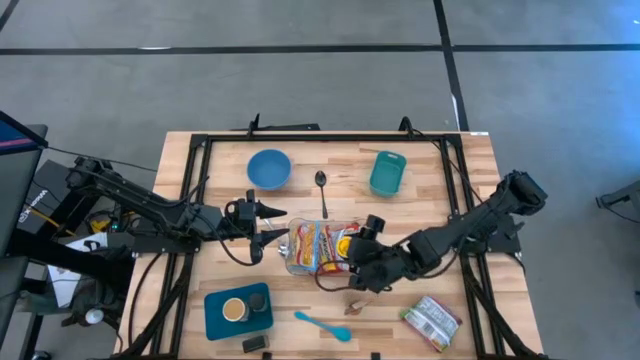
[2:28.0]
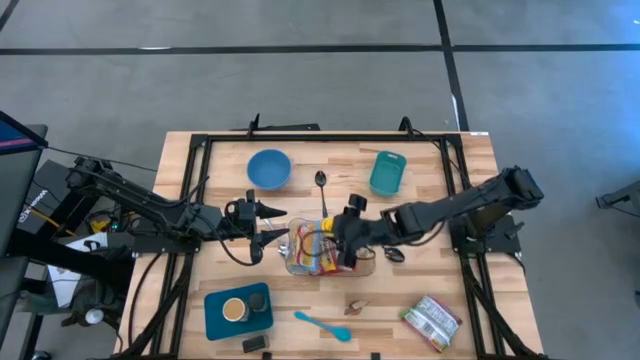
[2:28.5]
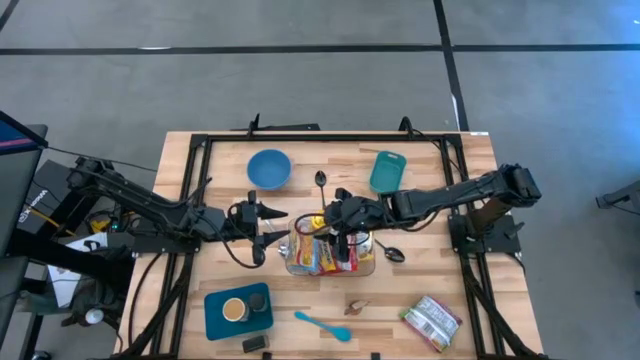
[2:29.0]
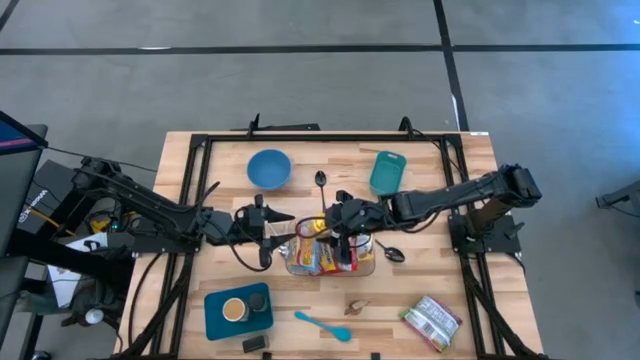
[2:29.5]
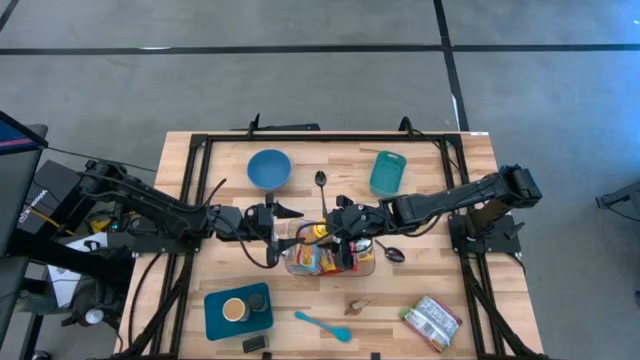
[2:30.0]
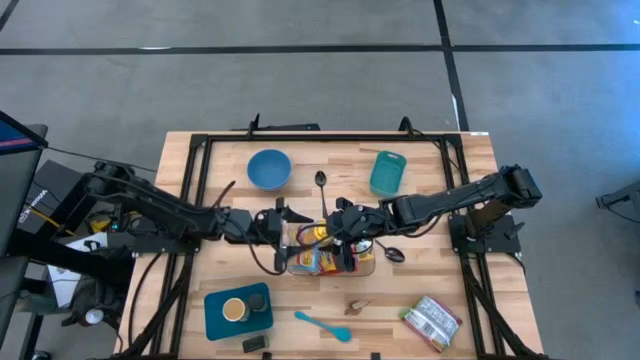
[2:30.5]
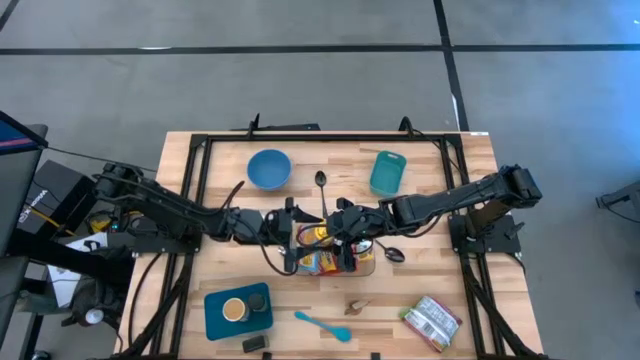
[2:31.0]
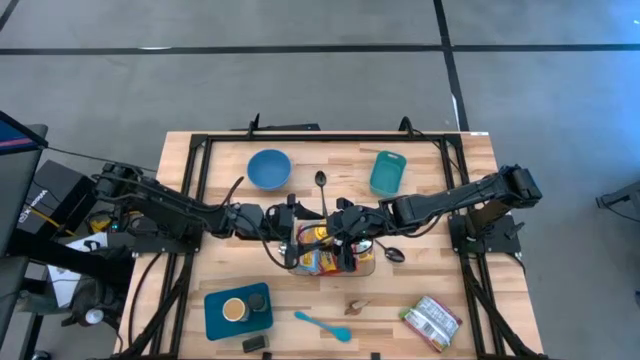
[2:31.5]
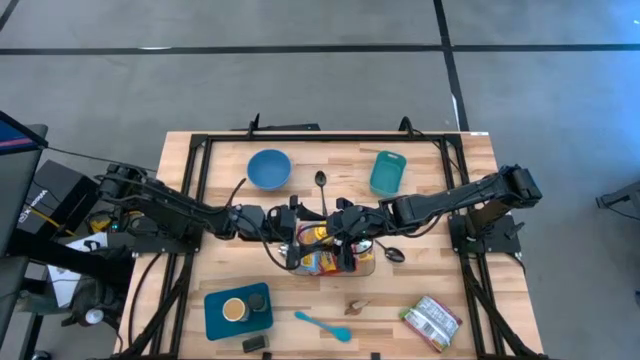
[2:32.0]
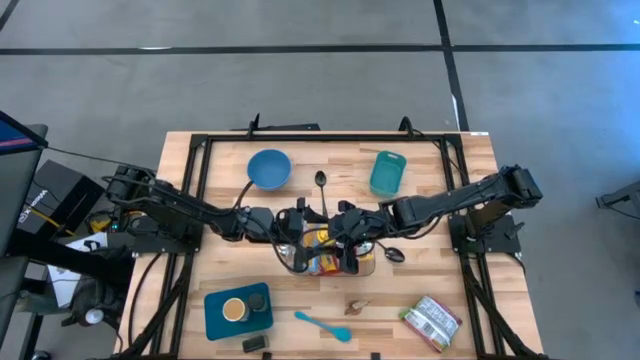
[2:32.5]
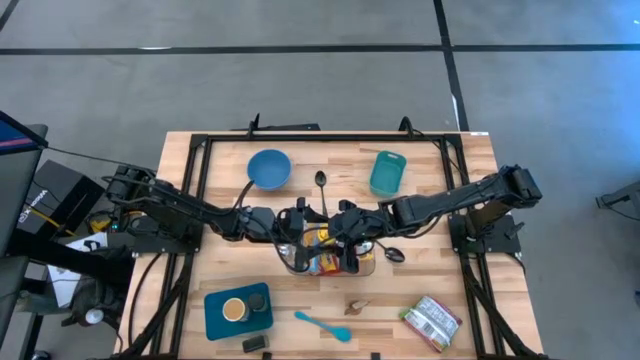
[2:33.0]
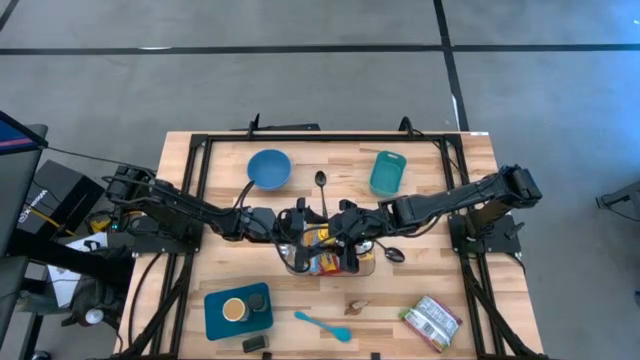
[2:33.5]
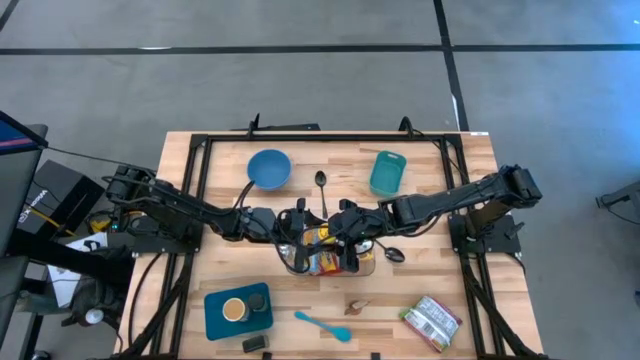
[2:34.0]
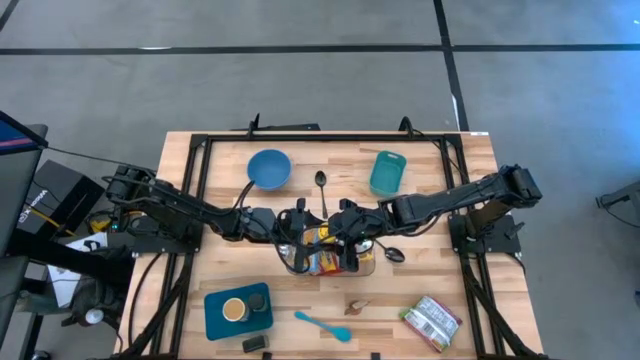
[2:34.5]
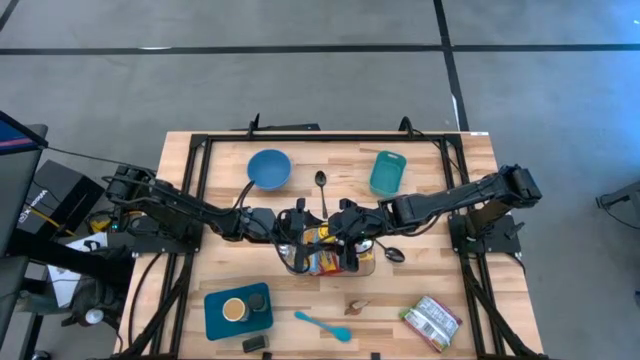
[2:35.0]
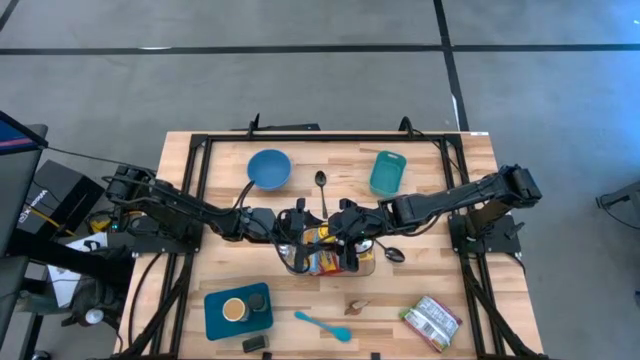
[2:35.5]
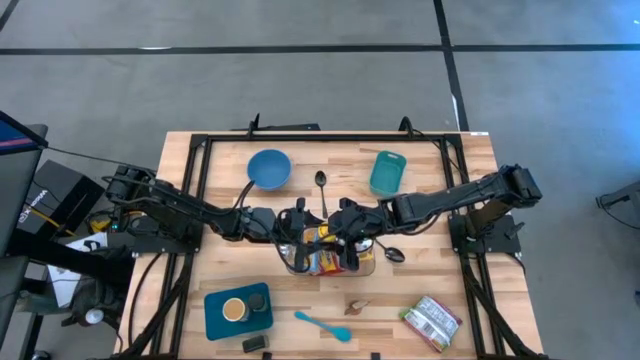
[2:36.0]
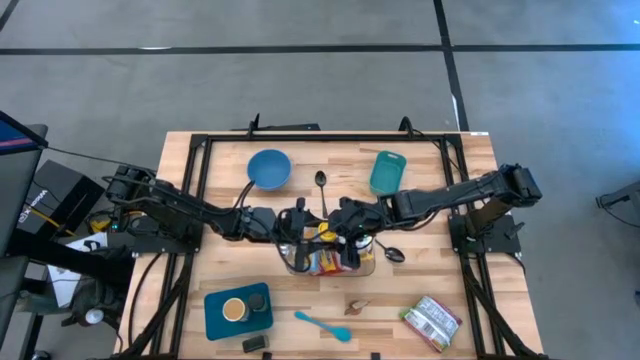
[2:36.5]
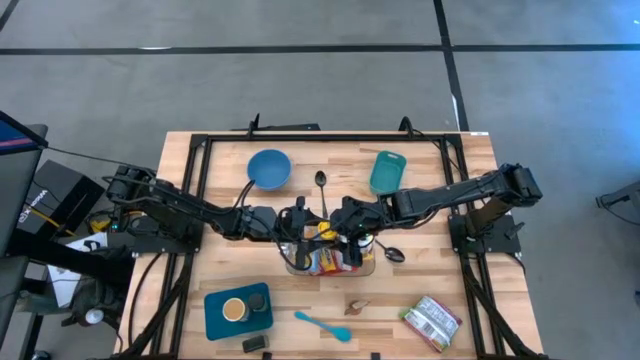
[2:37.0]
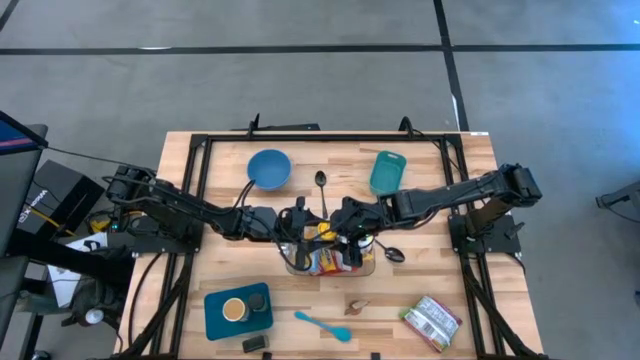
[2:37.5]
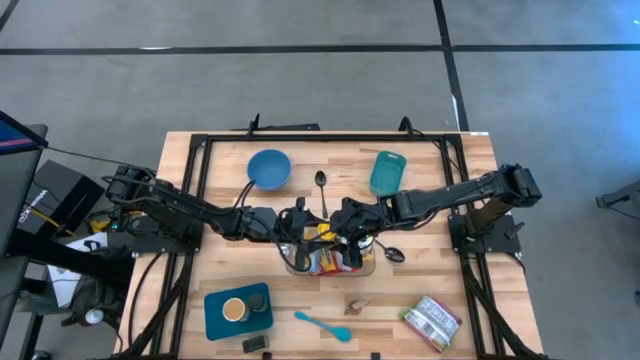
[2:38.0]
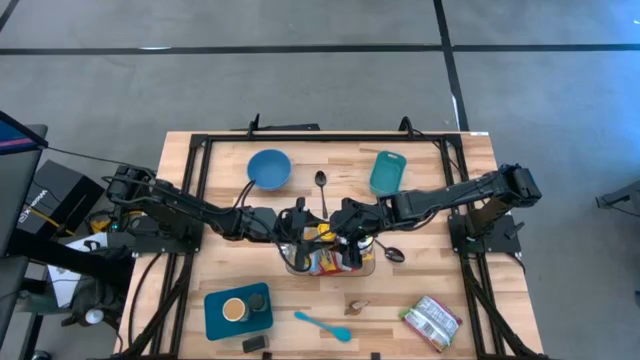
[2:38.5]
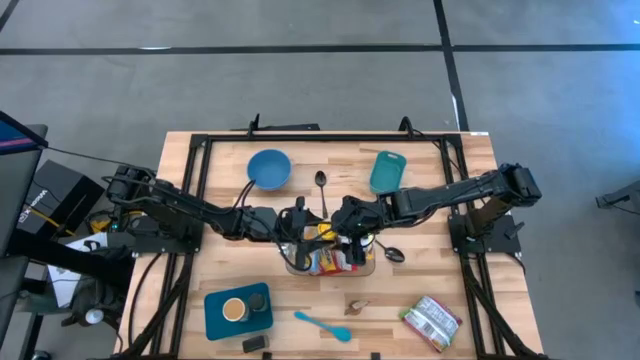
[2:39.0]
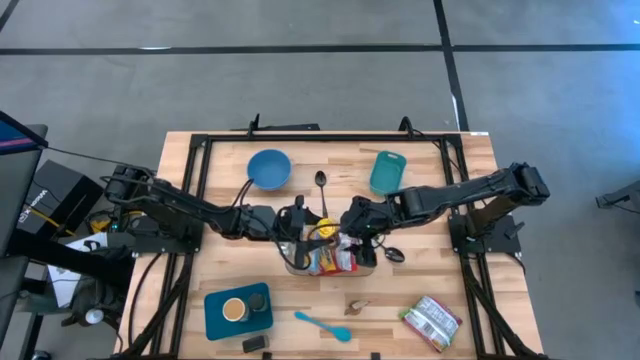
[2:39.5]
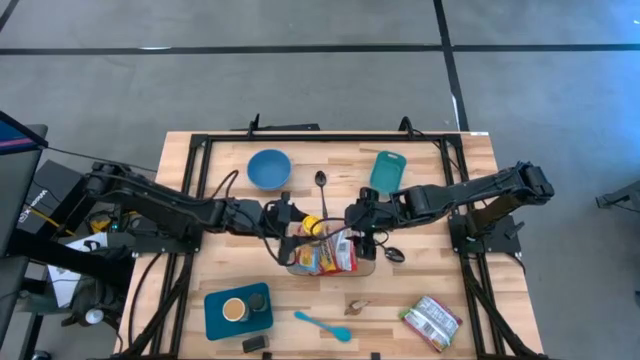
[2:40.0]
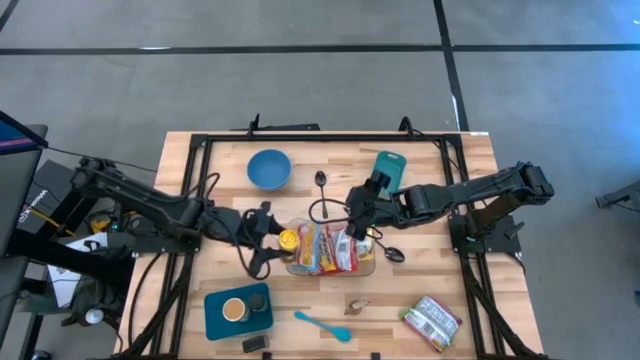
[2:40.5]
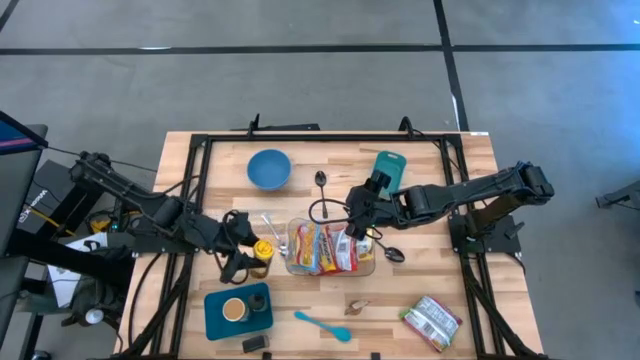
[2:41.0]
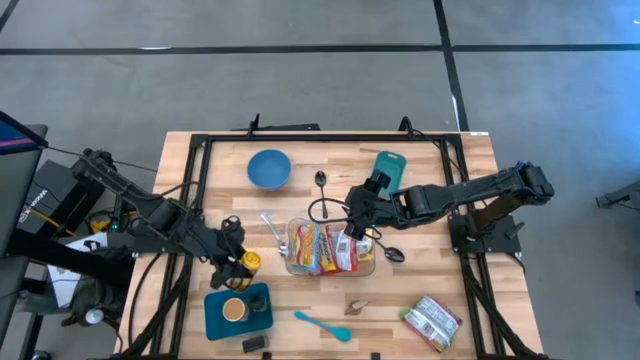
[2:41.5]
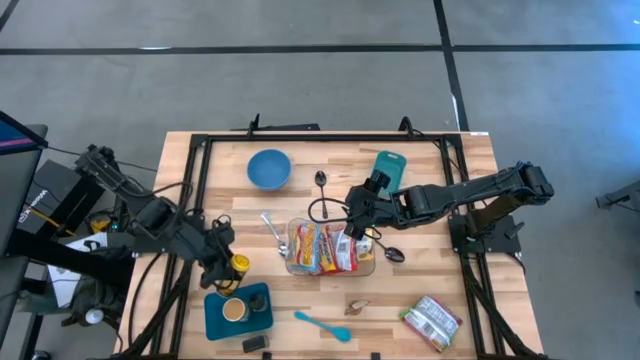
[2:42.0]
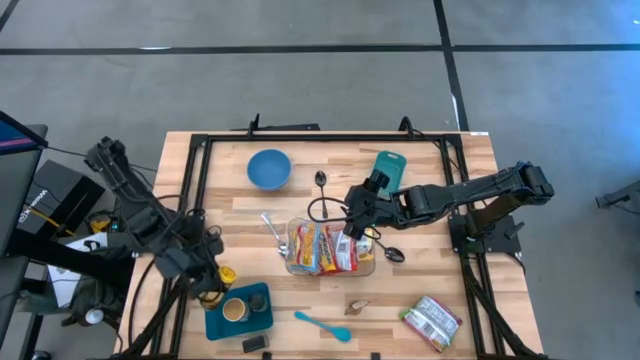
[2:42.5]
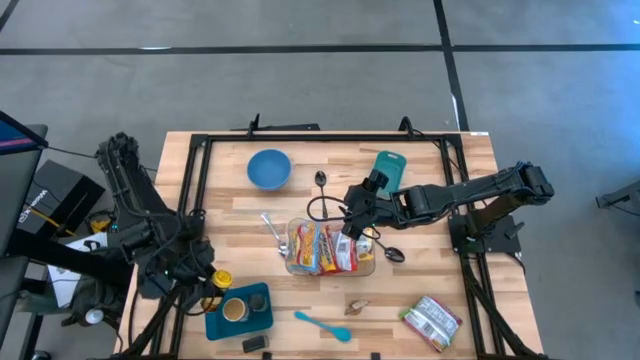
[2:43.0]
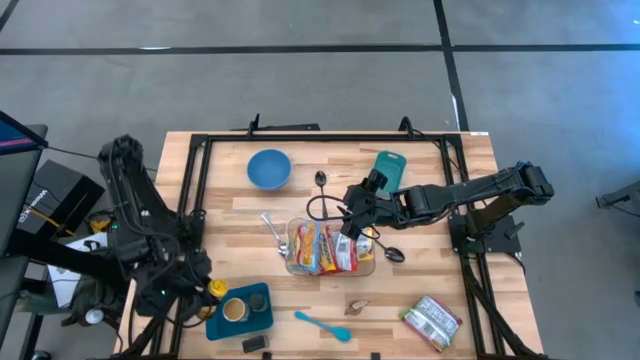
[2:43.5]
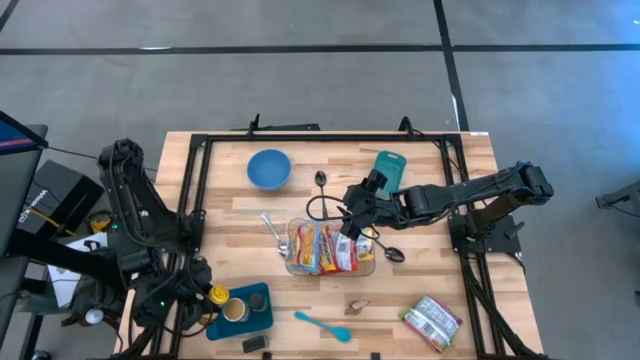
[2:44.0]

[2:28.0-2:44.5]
Task: Pick & Place Food Item
Put the yellow spice can into the dark blue bin

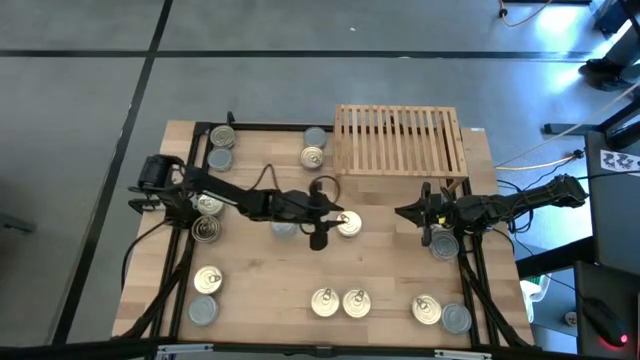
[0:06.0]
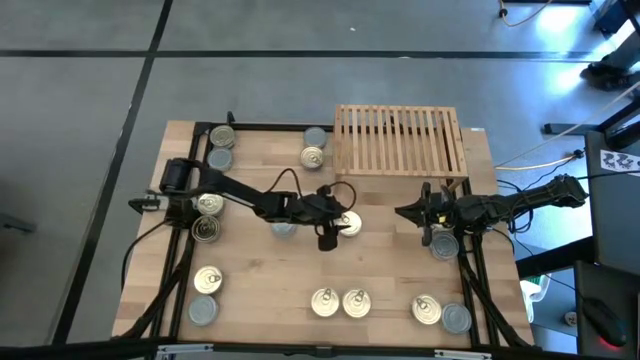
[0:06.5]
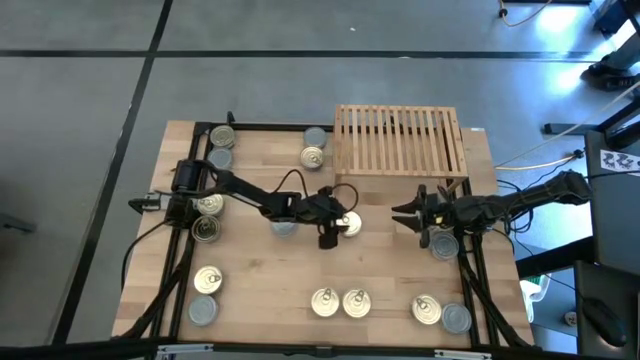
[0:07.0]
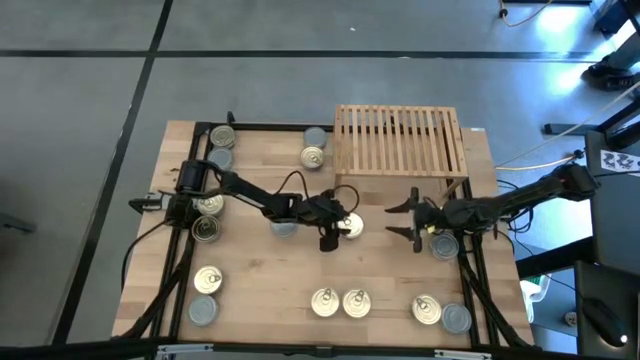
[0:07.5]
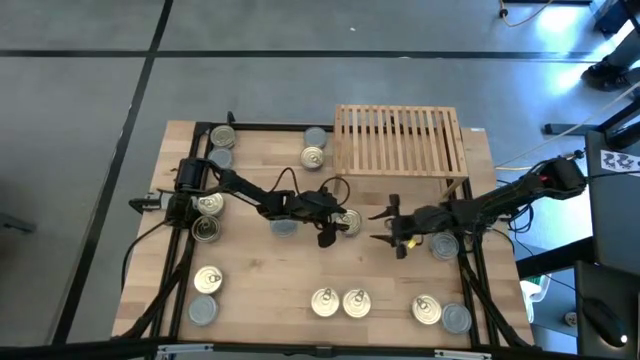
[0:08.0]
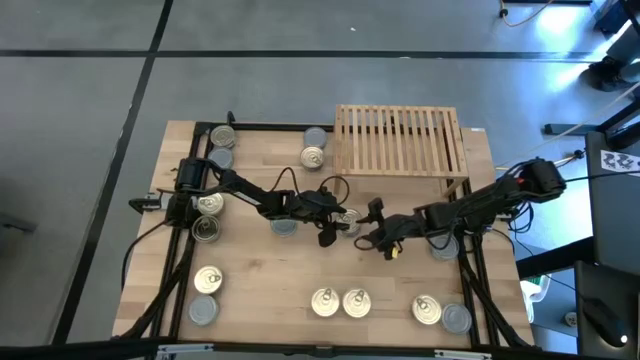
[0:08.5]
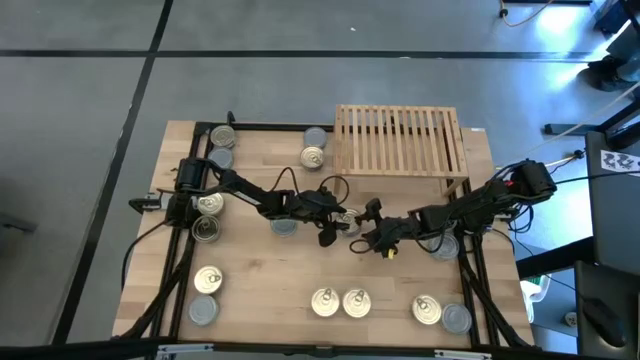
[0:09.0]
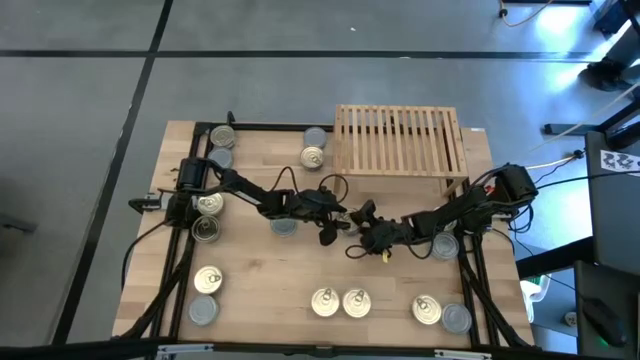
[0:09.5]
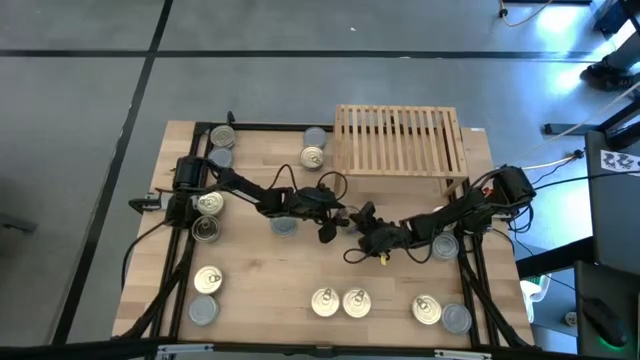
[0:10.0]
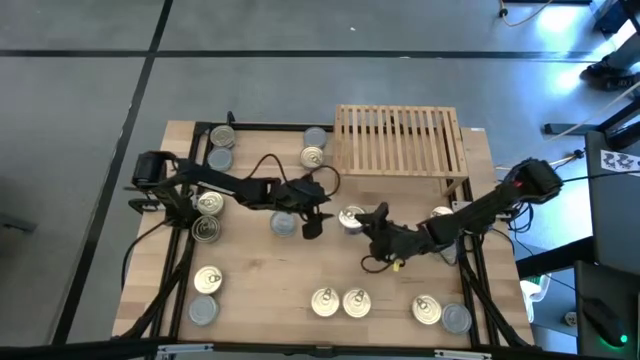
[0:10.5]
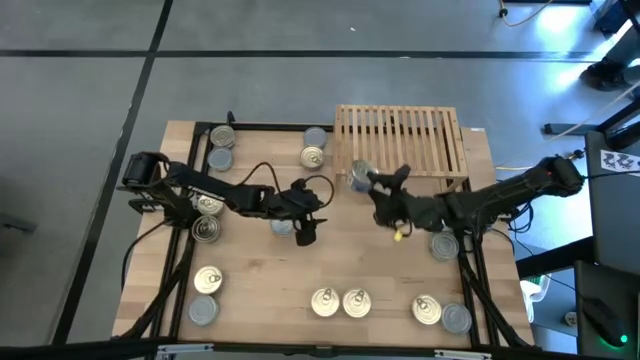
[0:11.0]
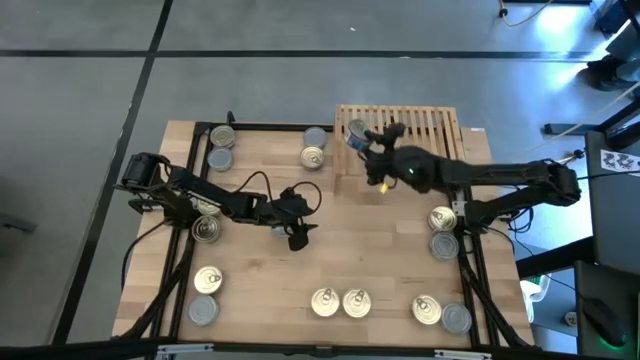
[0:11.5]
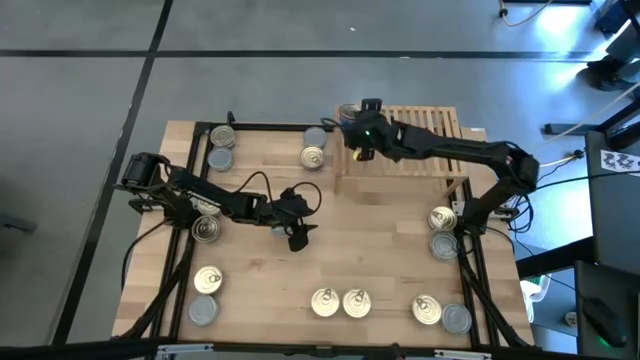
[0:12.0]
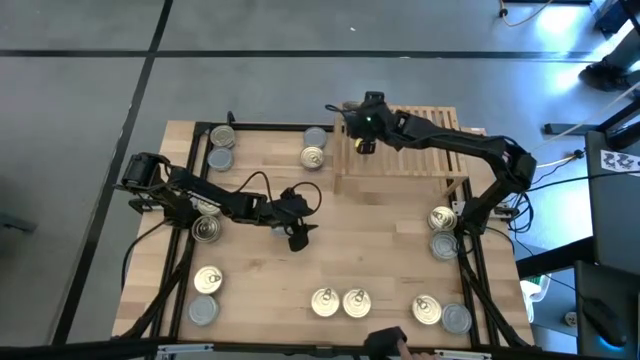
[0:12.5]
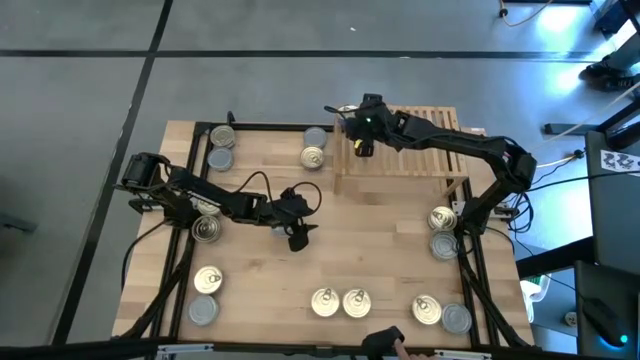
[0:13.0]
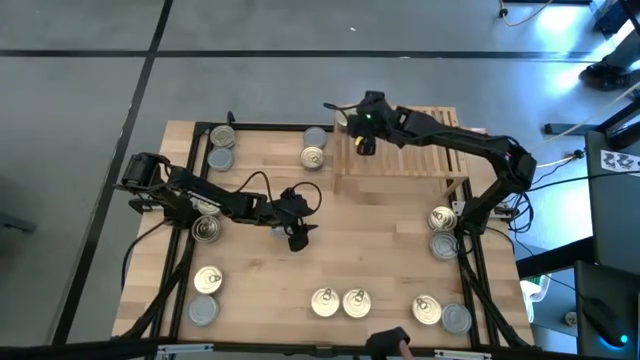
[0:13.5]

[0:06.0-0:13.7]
Task: Stack canned seafood by type on shelf
Put the blue-pink tuna can on the shelf
